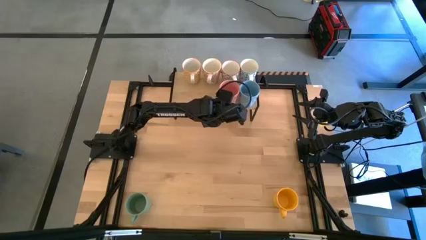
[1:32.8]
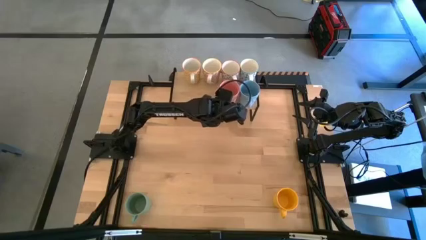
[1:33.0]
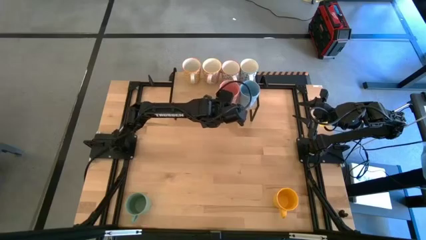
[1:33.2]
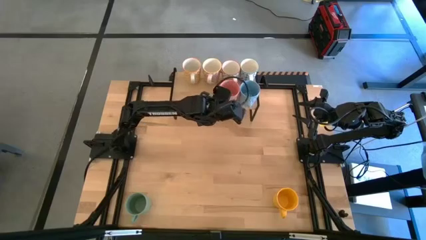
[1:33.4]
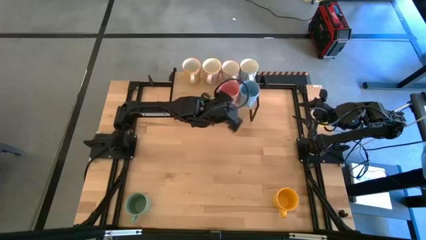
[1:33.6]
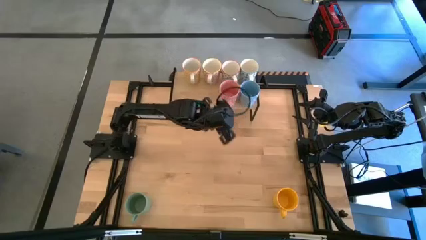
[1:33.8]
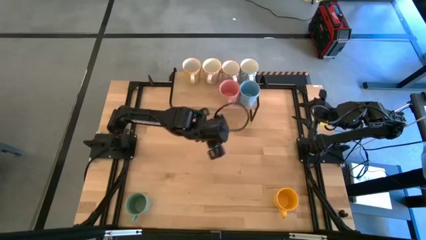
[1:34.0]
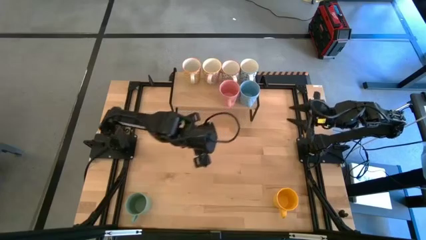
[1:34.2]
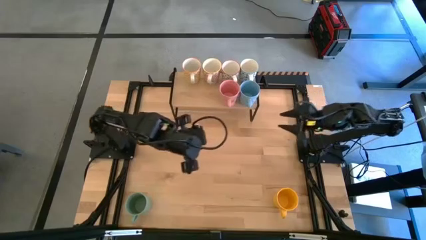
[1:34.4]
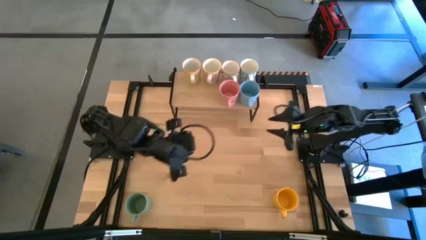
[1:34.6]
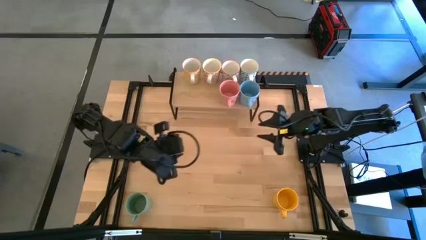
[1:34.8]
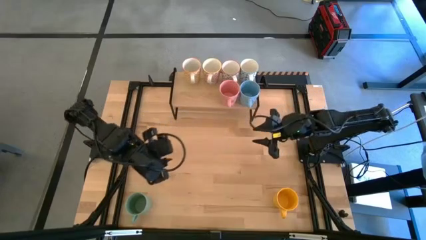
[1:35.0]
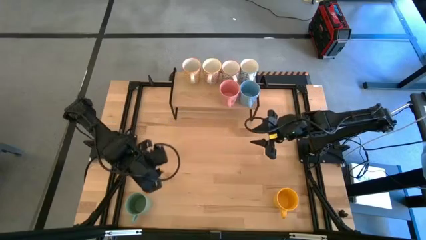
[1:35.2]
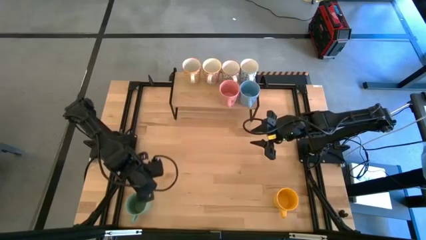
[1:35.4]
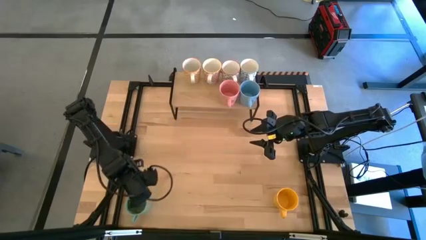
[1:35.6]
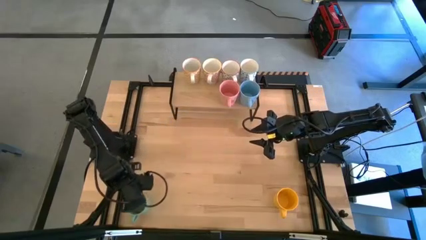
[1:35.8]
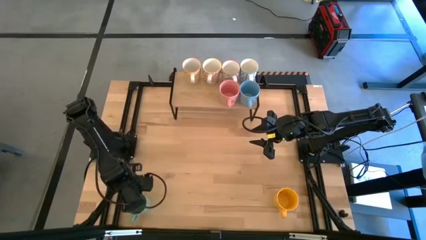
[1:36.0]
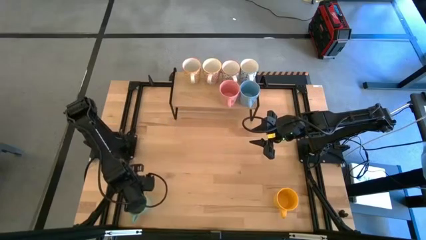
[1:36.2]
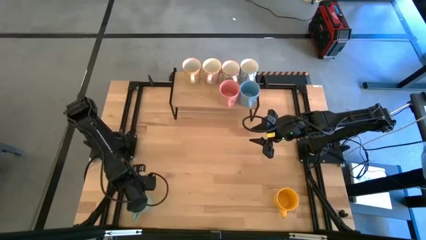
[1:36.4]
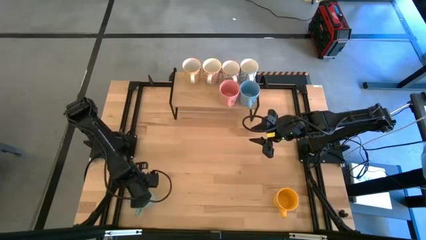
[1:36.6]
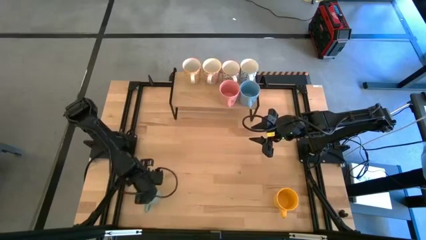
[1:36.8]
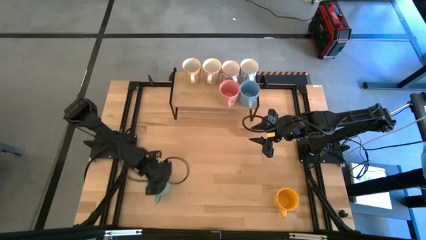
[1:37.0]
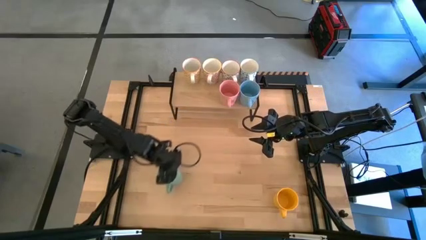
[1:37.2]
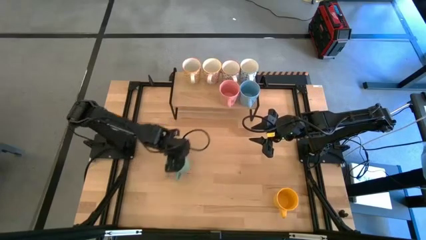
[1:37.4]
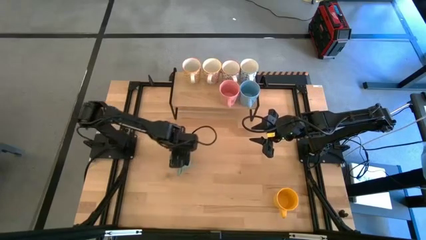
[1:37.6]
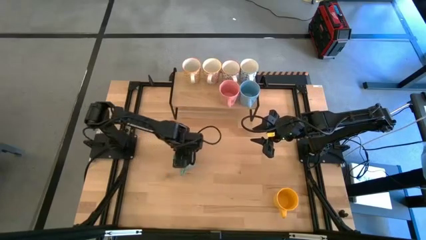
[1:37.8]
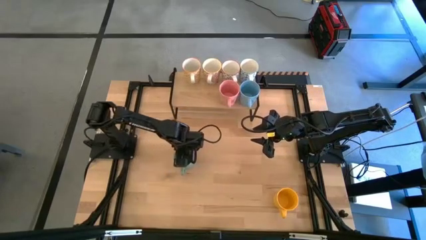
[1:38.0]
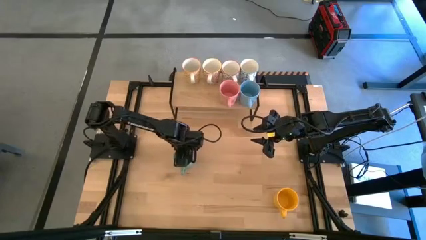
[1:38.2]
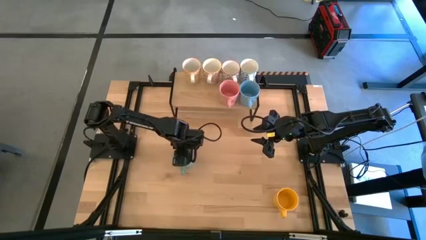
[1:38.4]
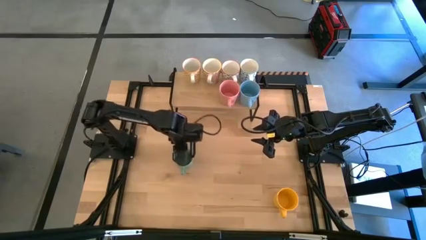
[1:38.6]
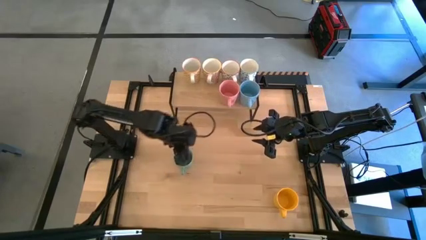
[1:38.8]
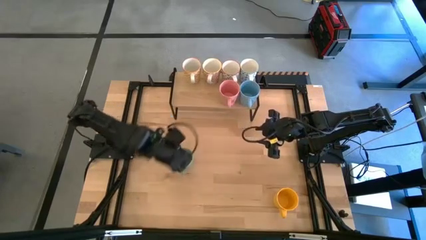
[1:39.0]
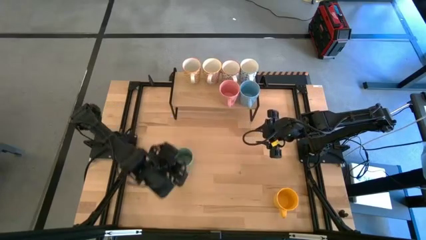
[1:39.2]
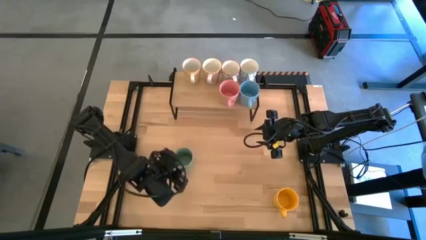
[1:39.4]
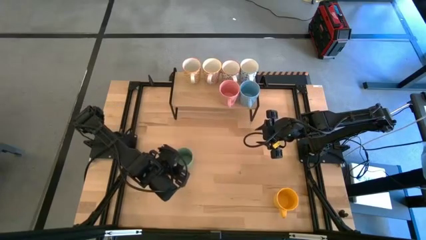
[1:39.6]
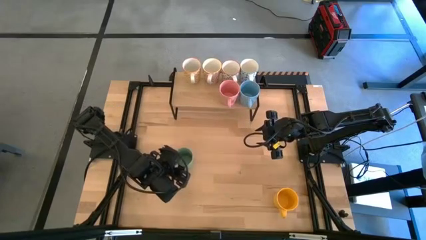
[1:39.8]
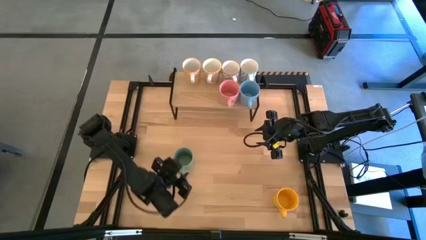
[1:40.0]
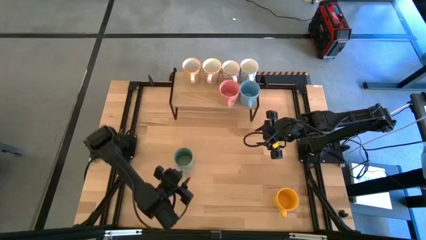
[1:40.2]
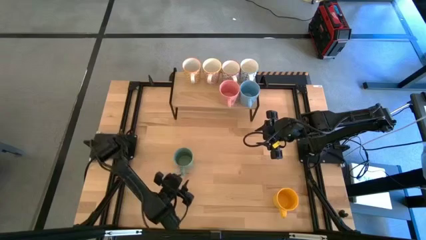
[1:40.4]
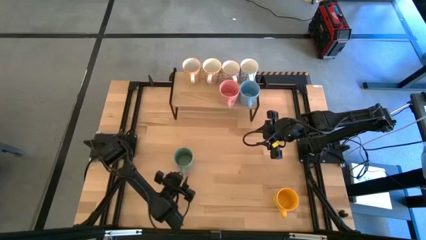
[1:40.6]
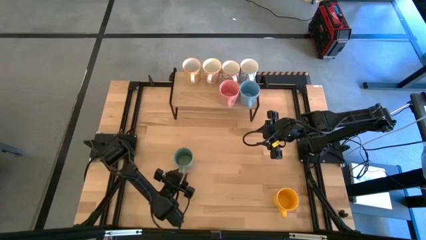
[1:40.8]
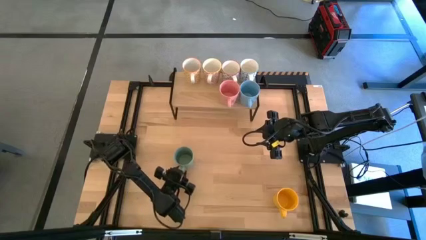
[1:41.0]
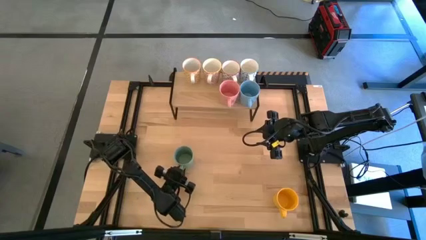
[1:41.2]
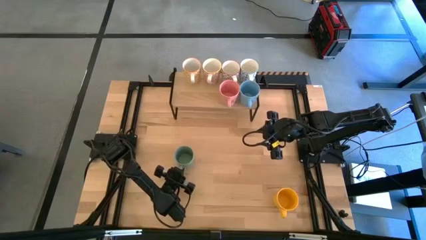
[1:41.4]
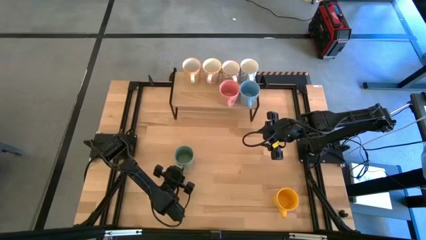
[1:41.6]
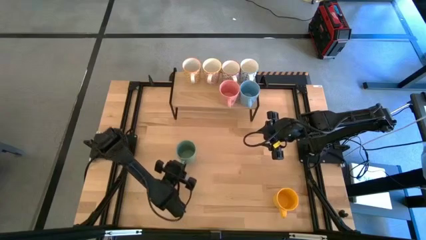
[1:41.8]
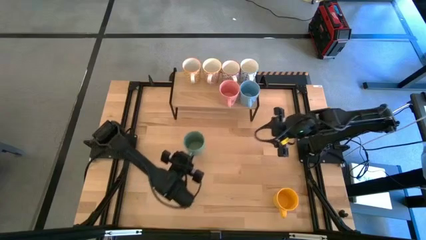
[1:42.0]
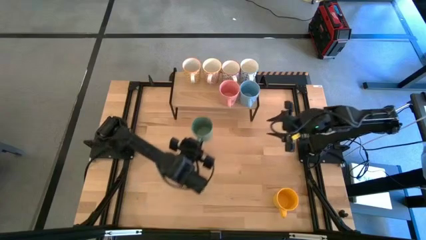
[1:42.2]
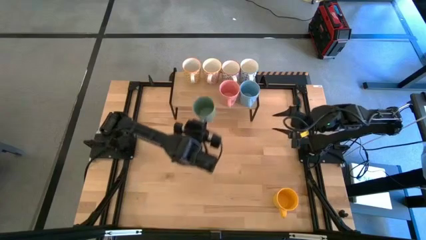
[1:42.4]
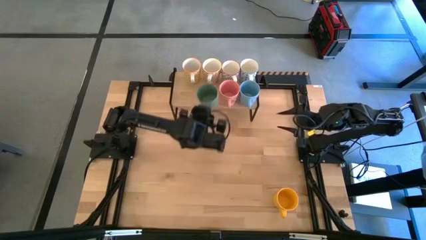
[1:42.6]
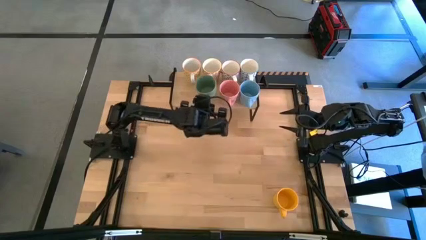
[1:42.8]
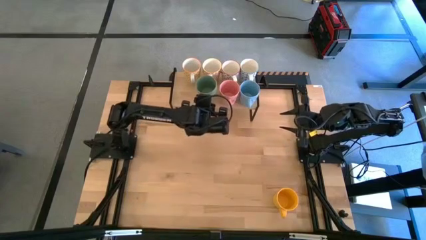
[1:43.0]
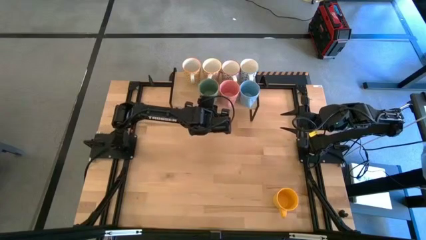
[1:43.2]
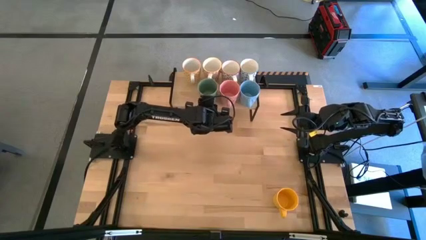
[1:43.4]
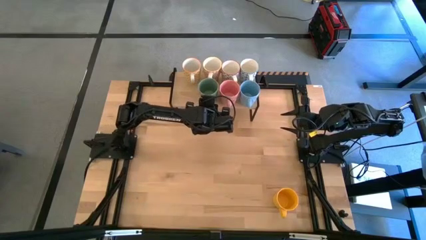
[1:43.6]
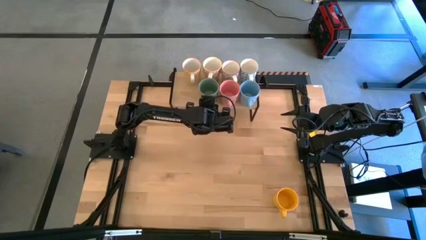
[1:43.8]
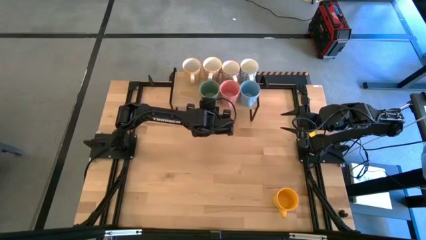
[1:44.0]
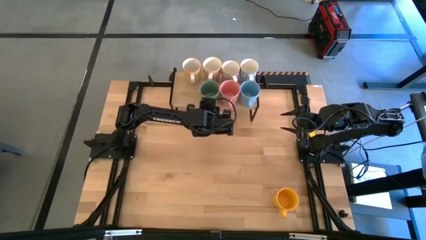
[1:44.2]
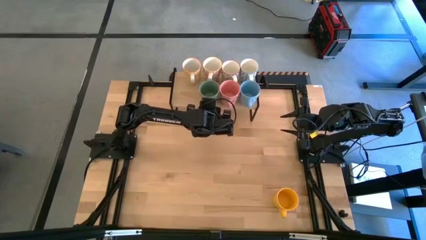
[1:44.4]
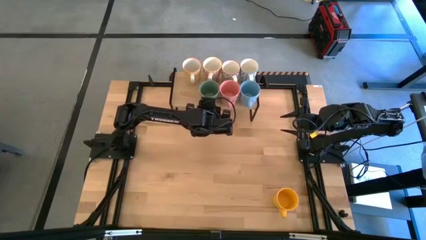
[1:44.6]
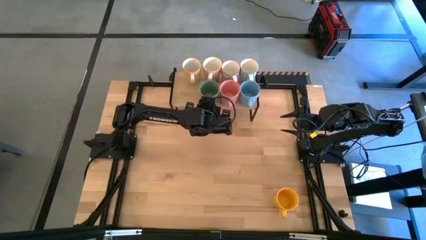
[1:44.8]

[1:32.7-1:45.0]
Task: Place coffee mugs
Put the green mug on the shelf

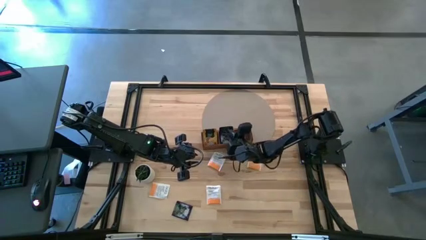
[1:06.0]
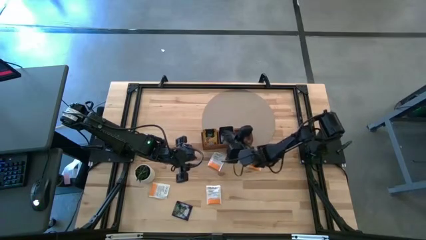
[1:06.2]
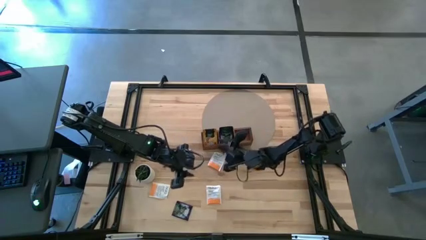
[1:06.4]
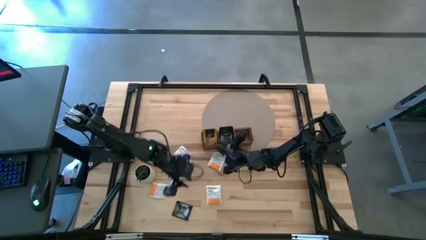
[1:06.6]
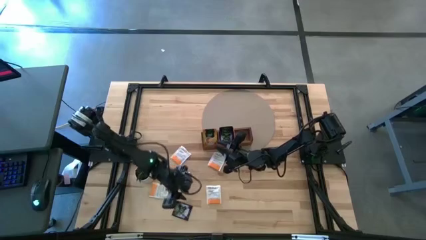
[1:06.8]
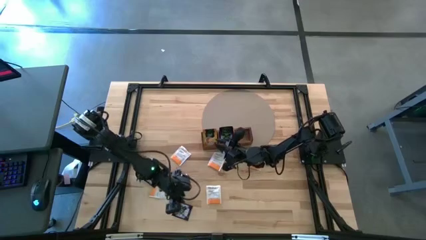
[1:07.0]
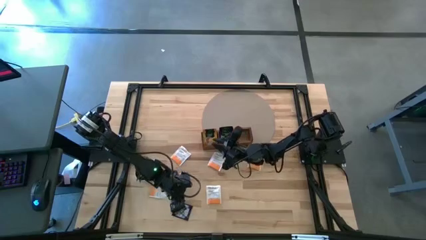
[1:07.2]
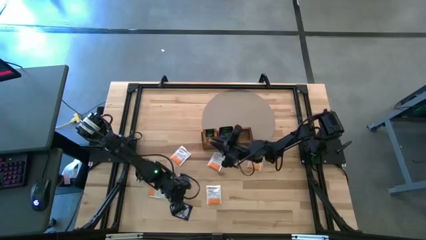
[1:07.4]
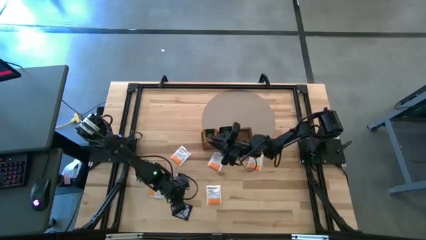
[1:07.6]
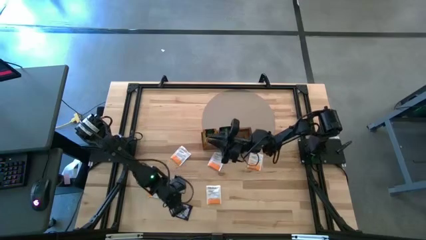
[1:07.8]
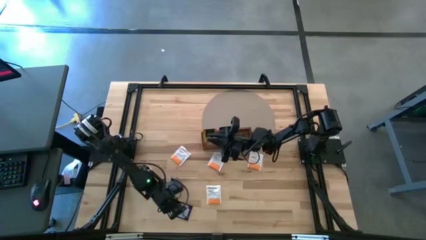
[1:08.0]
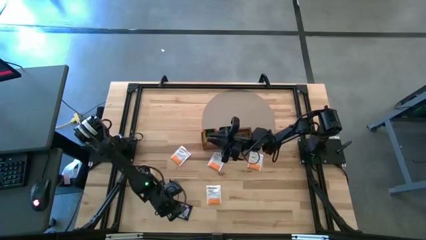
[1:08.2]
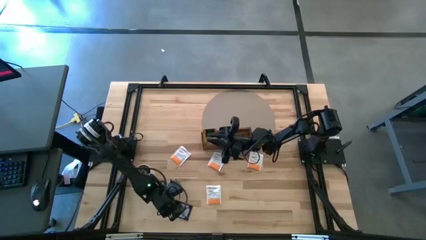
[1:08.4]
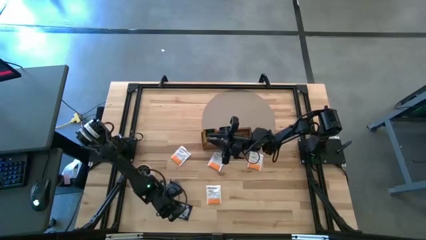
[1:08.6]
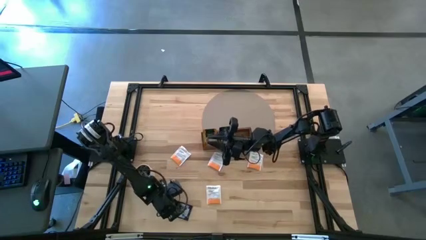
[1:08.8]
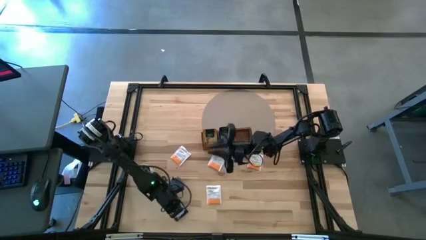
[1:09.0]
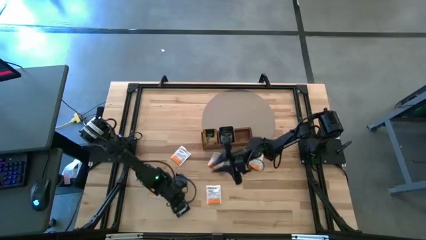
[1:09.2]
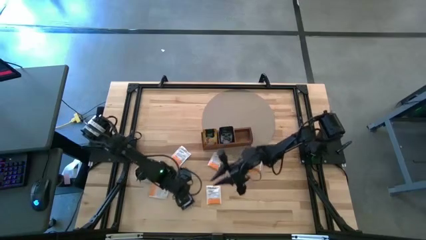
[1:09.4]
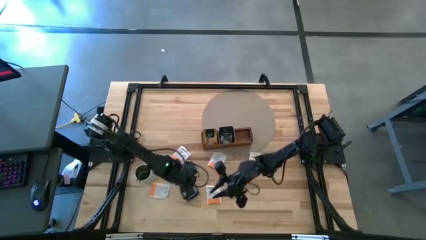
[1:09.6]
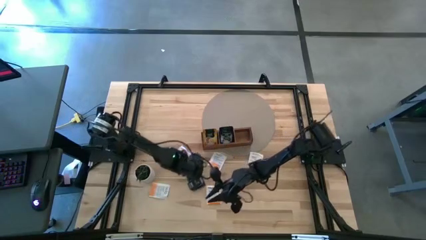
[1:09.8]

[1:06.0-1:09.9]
Task: Pick & Place Tea
Put the violet tea bag into the middle section of the wooden organizer
